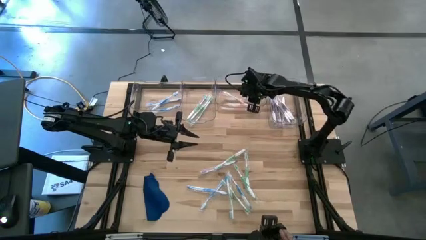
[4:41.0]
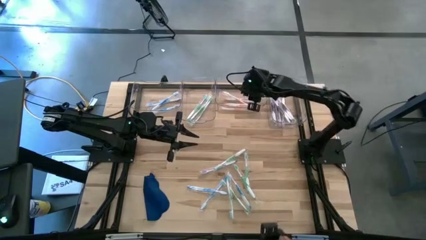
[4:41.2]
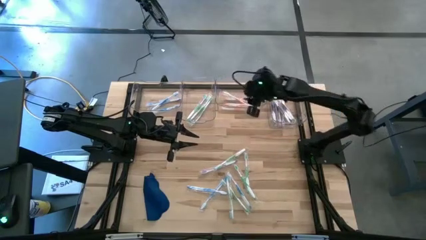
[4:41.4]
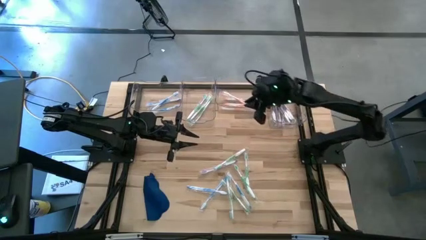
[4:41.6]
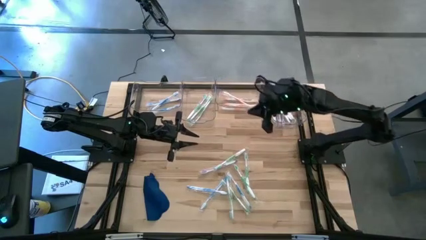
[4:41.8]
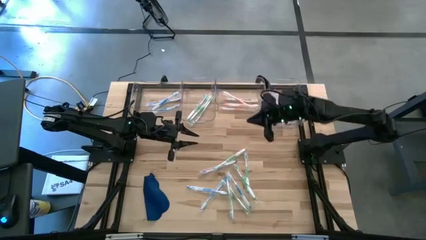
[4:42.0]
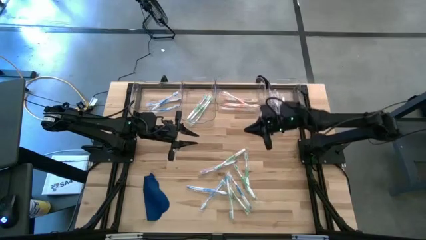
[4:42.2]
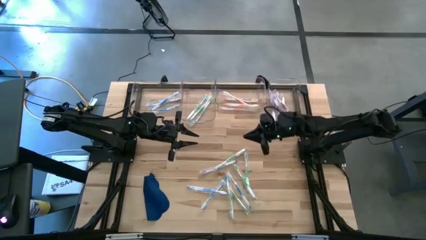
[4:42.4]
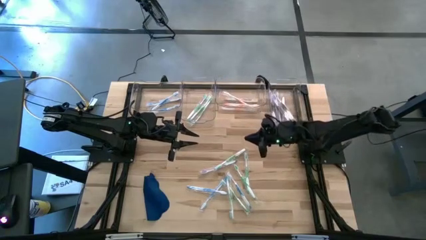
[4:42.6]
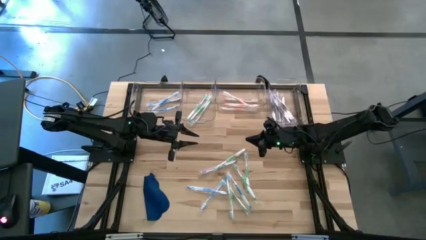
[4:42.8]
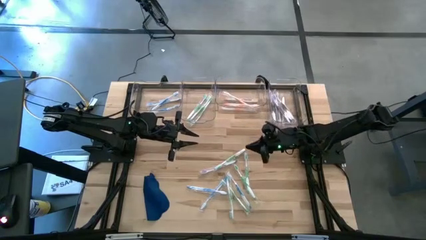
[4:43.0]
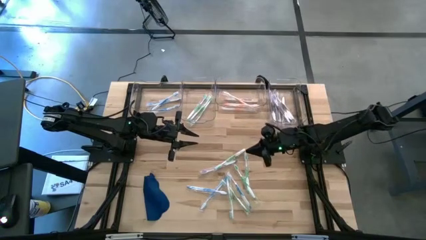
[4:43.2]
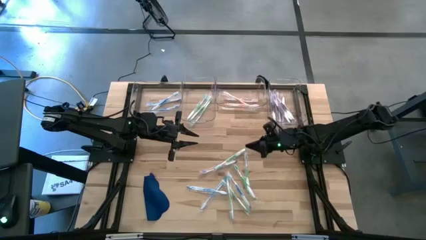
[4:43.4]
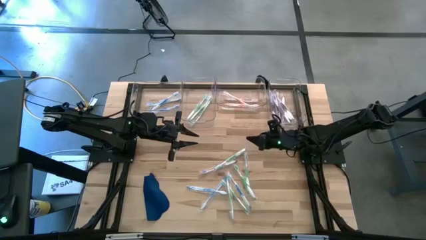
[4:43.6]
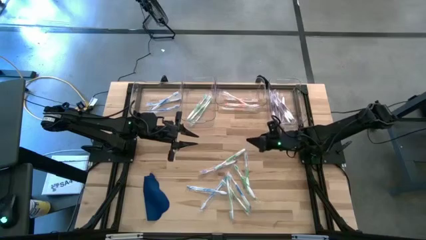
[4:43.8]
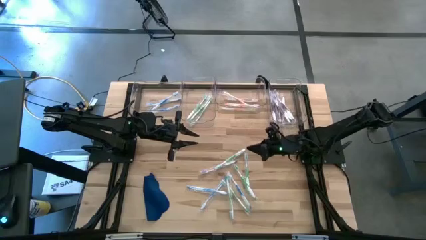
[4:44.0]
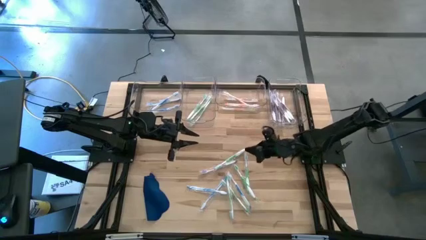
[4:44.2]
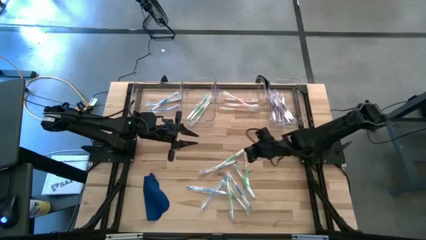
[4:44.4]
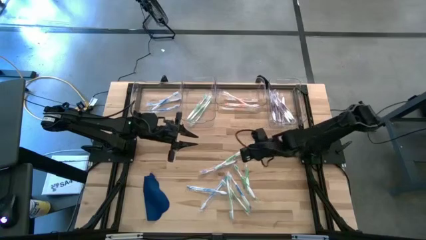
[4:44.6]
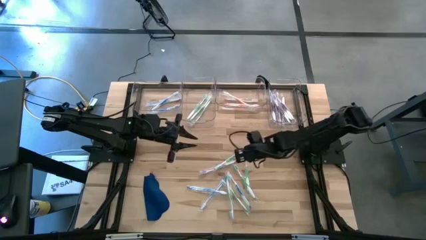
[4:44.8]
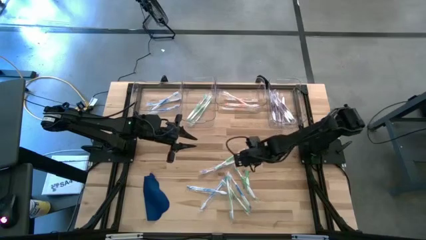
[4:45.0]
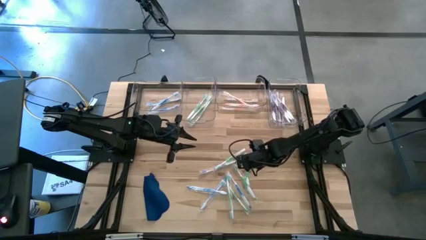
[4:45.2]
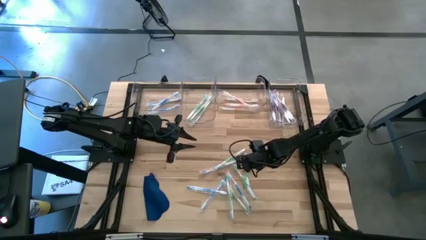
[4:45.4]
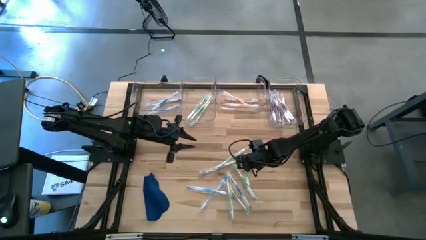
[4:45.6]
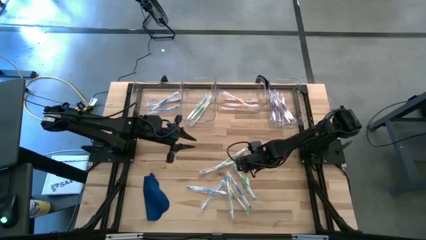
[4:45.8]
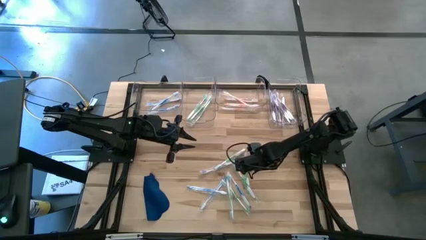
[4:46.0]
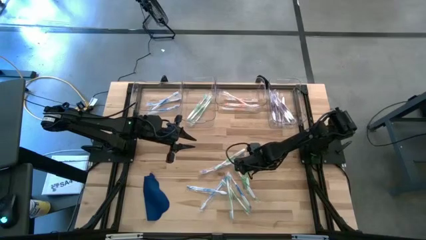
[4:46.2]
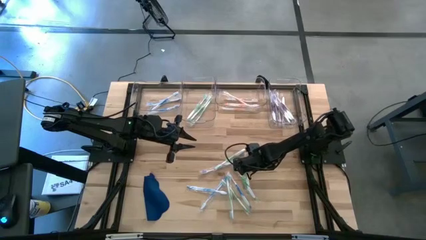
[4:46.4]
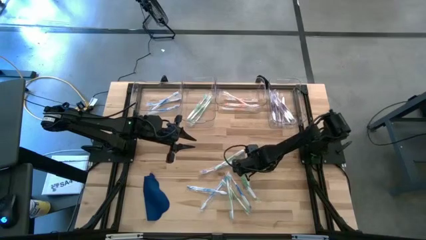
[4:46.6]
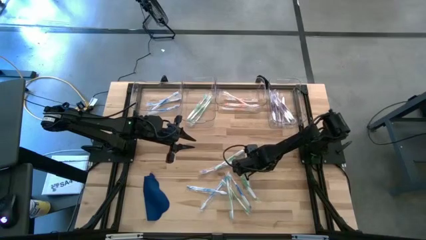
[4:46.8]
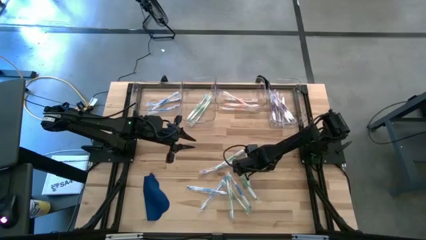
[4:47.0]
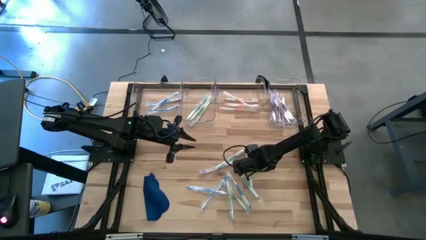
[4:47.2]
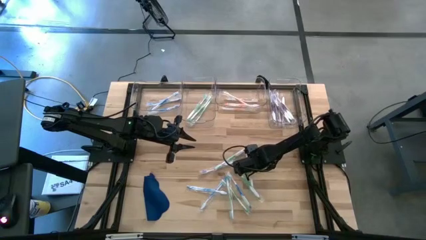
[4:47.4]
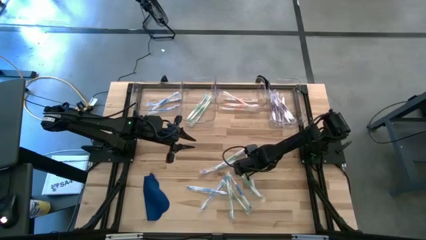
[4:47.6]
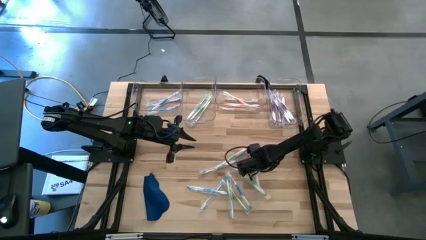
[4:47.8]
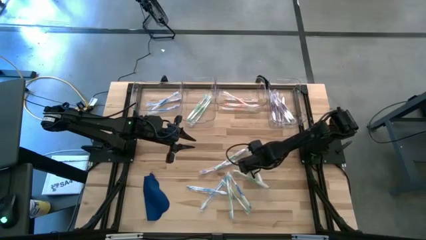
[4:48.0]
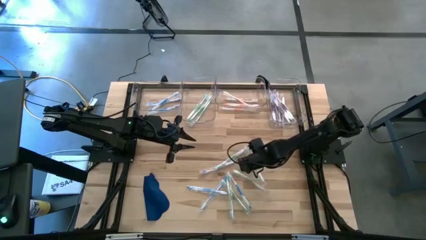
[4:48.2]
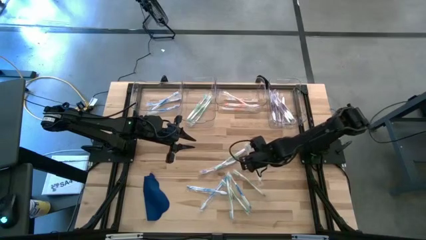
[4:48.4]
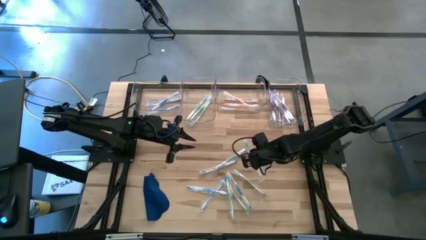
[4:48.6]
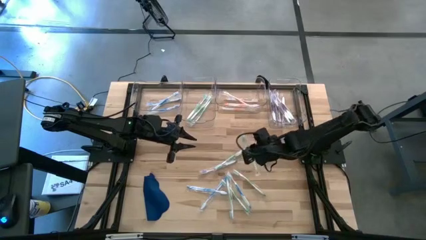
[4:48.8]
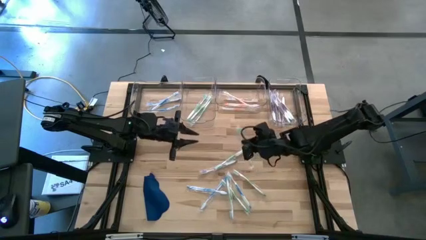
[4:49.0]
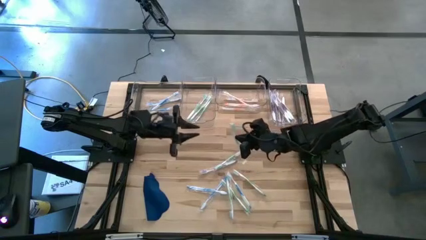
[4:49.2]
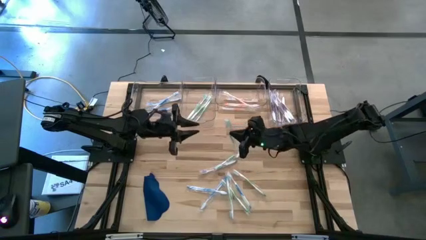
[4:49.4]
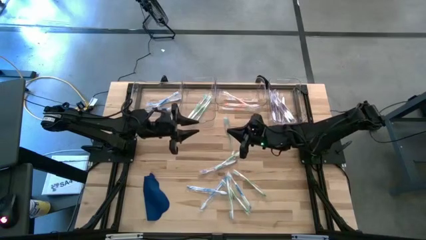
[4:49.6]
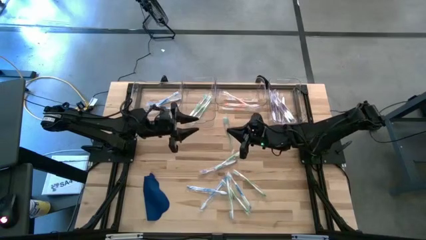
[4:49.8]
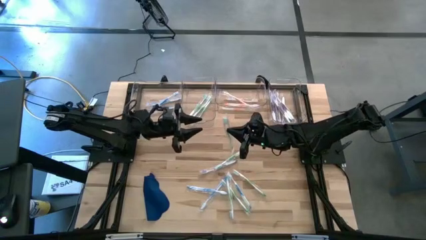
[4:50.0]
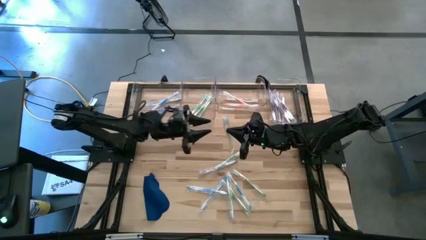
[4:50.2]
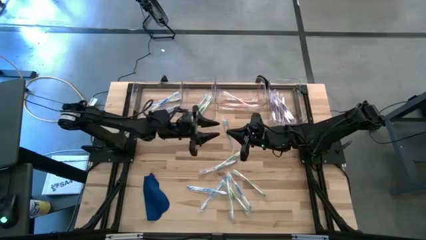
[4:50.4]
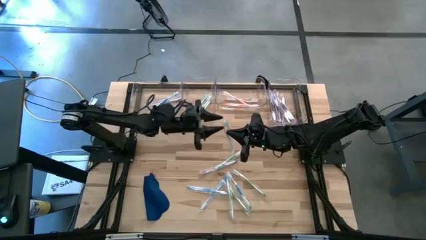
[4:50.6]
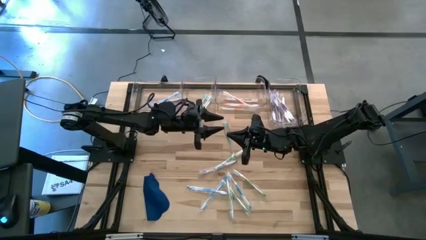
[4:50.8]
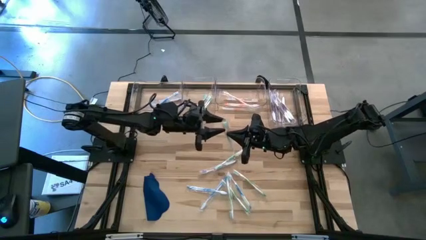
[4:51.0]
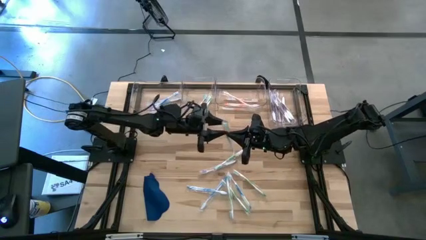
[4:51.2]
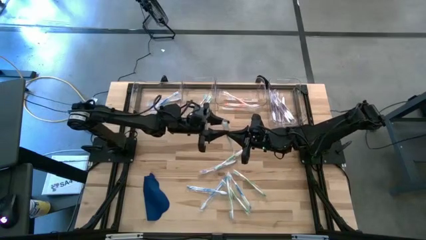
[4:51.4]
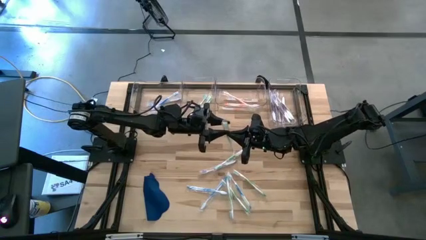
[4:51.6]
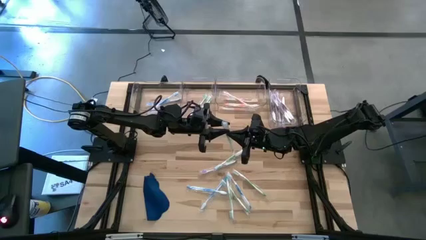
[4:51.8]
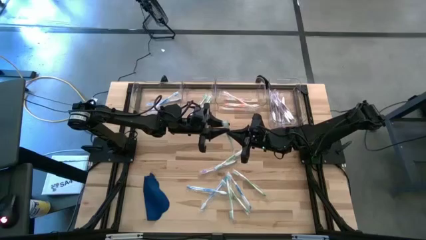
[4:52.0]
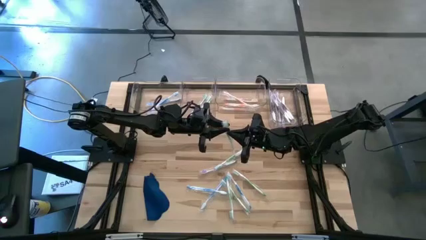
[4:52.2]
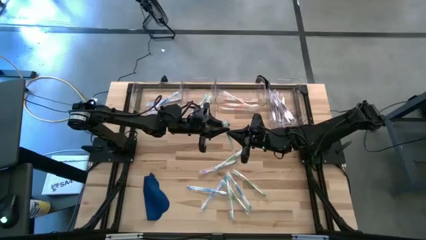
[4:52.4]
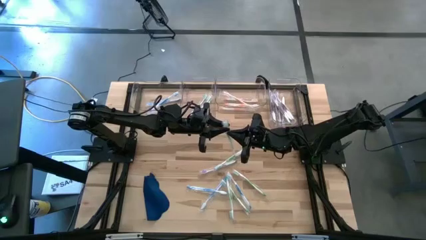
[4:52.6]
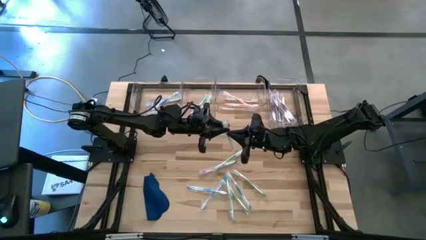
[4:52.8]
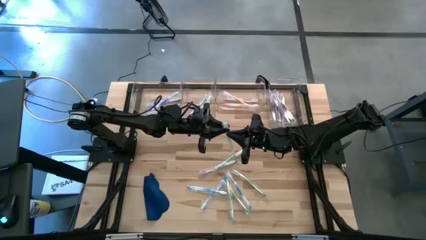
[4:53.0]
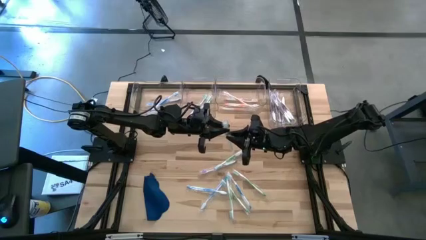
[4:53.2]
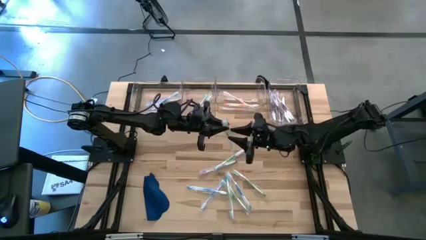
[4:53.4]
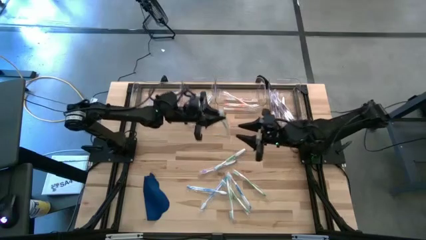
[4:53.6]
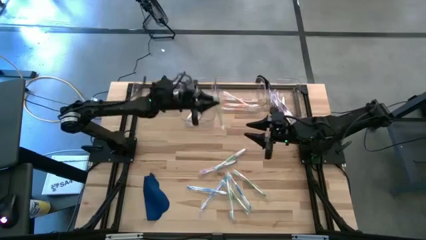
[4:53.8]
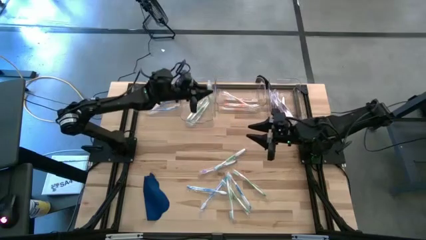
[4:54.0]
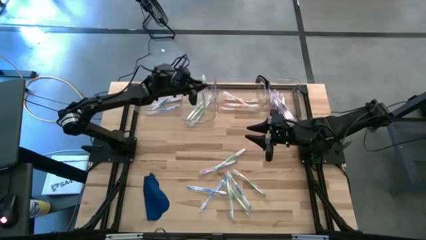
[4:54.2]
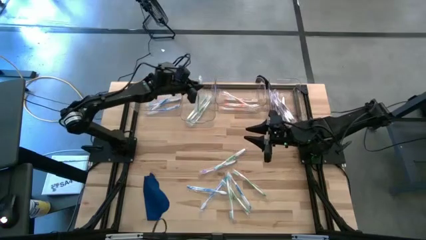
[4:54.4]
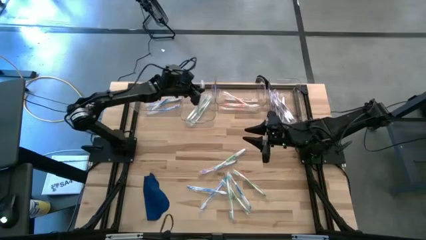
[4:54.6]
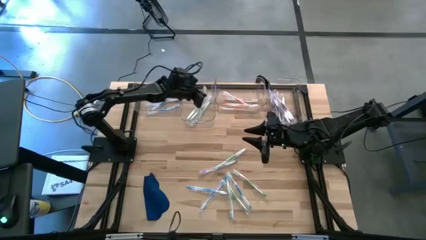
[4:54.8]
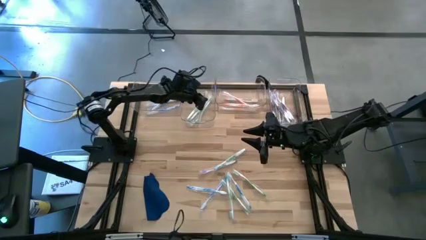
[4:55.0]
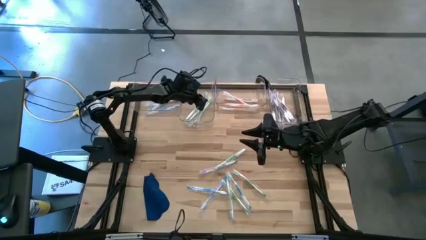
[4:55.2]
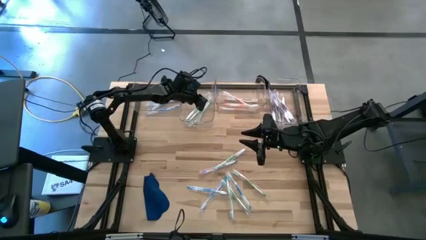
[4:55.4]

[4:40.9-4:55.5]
Task: Pick & Place Toothbrushes
Put the green toothbrush into the middle left transparent bin

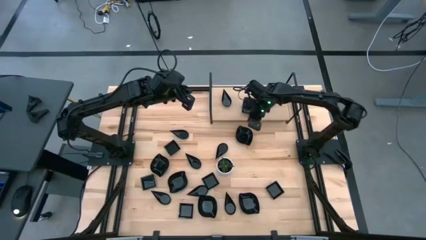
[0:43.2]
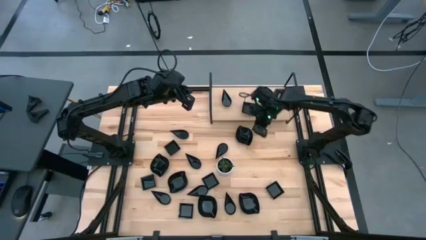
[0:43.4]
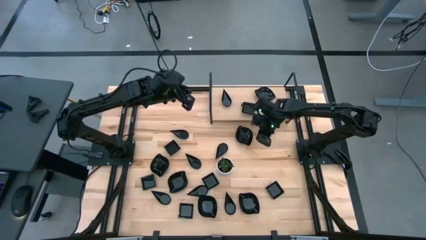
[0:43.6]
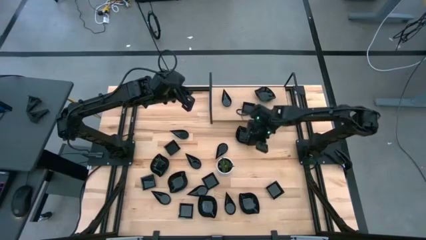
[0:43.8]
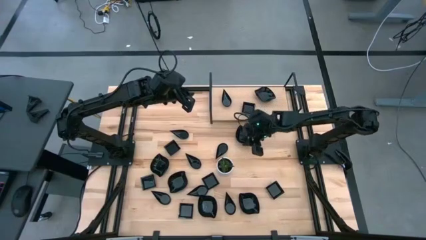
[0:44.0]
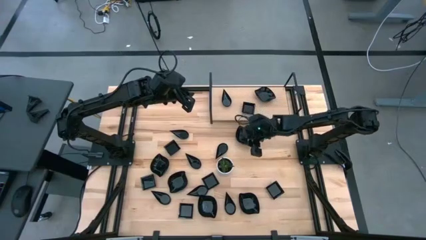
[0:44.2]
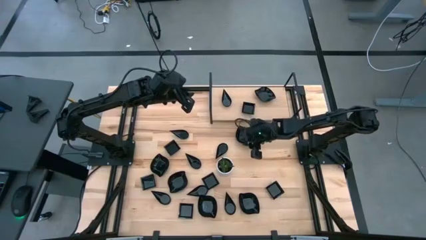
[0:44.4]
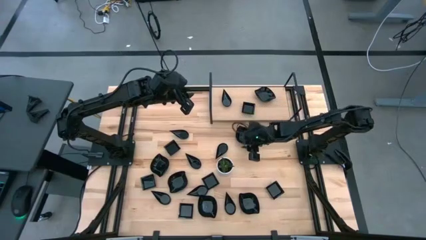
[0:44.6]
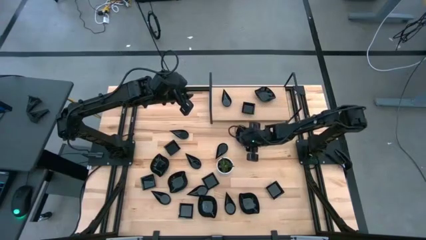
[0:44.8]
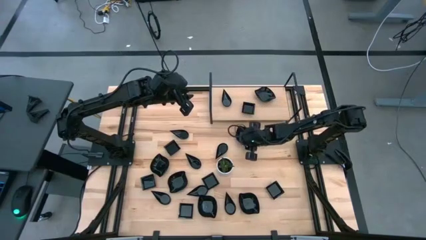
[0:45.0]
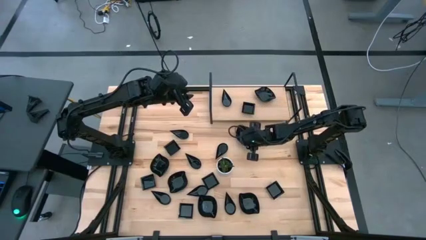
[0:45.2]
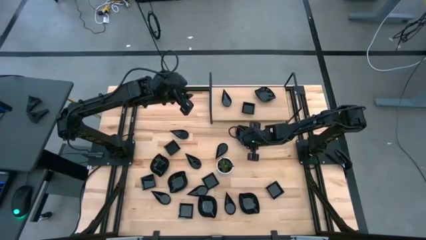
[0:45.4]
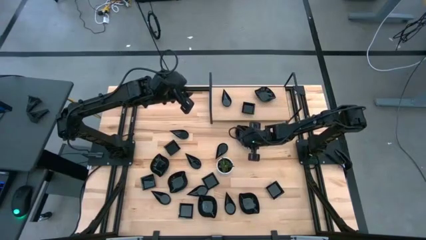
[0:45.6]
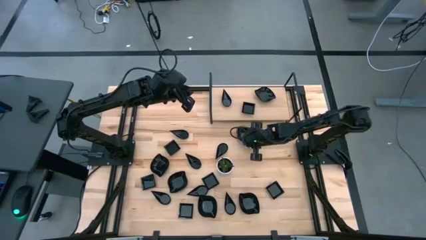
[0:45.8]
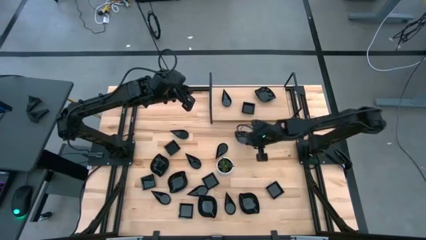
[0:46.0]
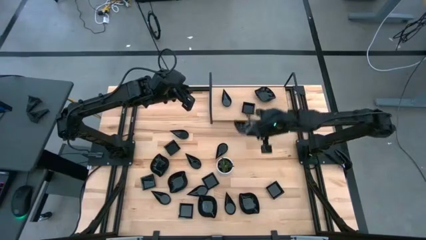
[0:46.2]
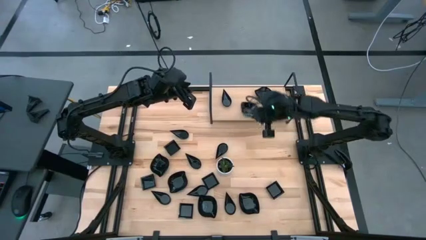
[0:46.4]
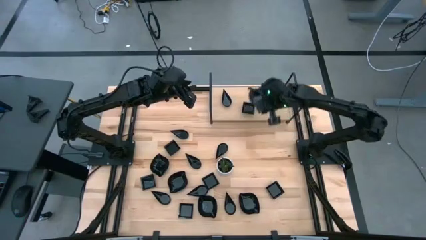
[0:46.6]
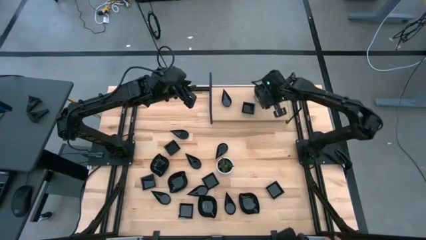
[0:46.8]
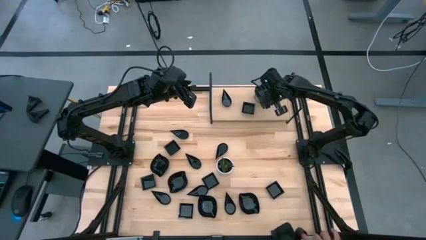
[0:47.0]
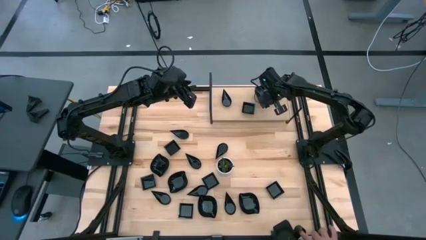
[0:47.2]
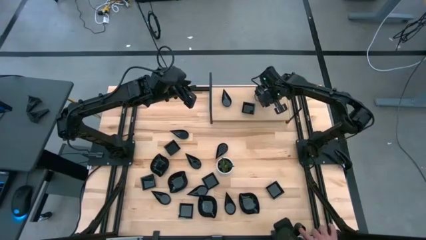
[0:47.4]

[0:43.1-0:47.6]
Task: Pick & Place Mini shaped plates
Stack the leaf shaped plate on top of the leaf shaped plate on the shelf
